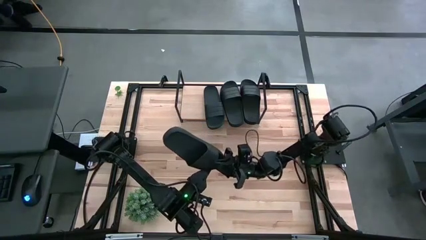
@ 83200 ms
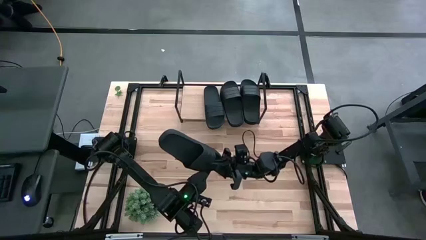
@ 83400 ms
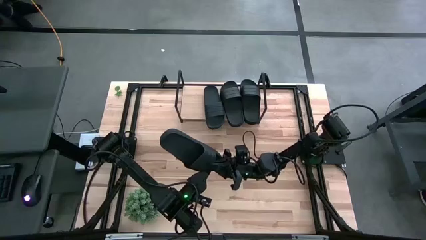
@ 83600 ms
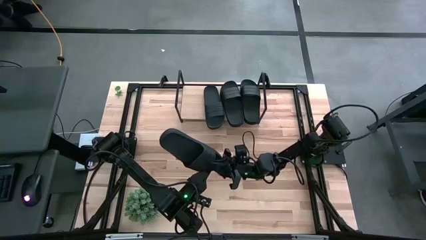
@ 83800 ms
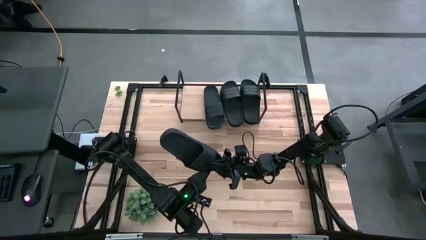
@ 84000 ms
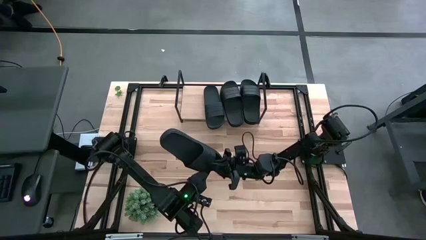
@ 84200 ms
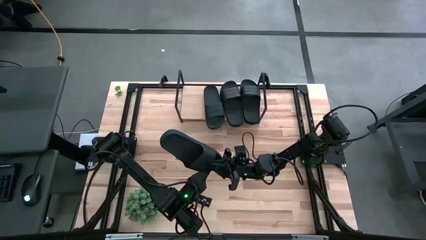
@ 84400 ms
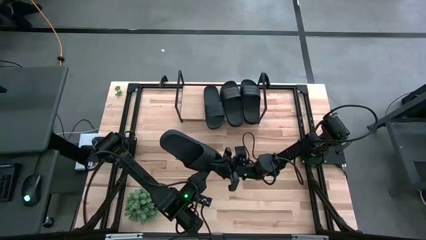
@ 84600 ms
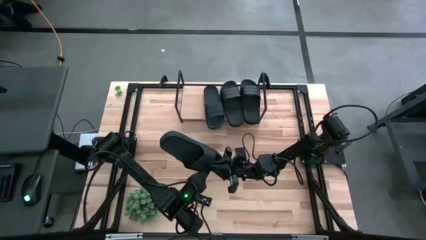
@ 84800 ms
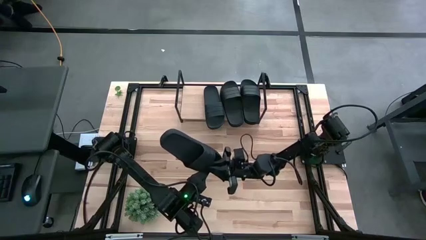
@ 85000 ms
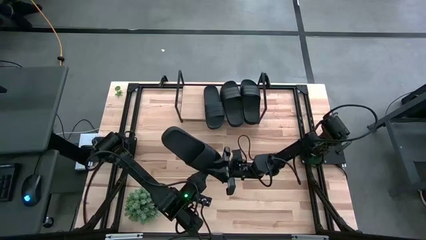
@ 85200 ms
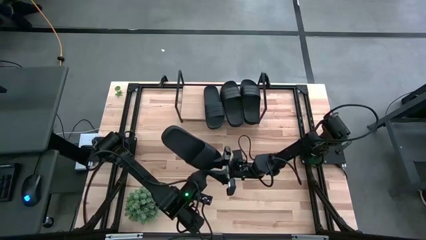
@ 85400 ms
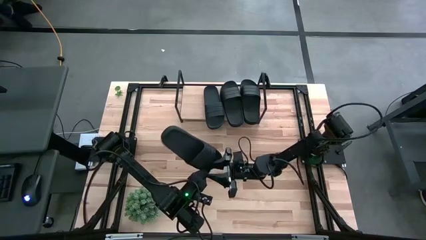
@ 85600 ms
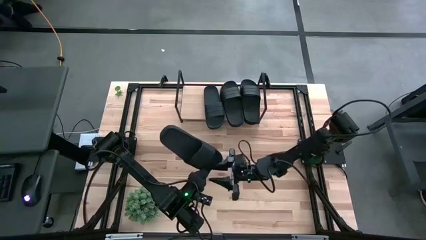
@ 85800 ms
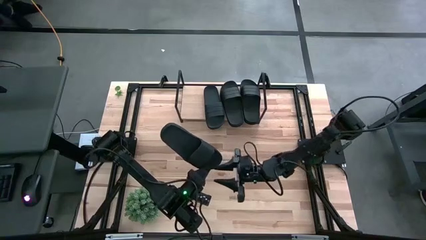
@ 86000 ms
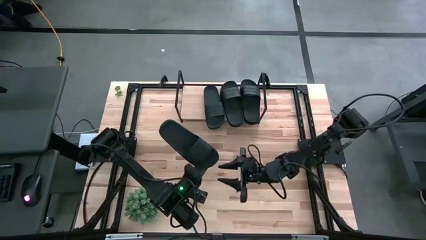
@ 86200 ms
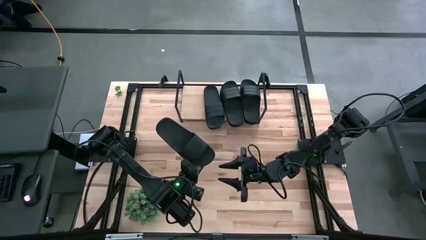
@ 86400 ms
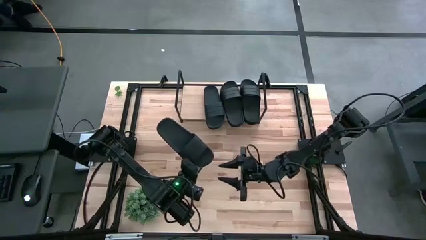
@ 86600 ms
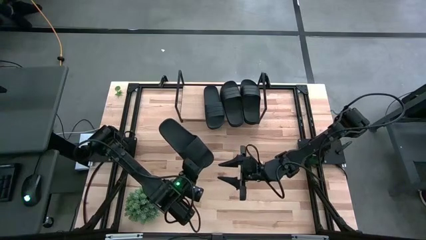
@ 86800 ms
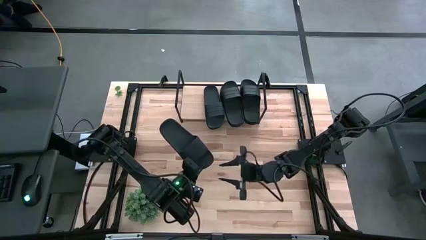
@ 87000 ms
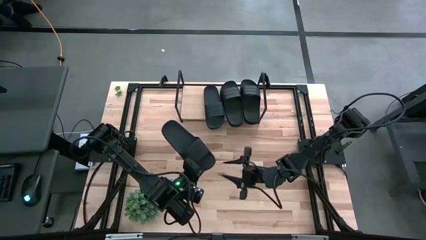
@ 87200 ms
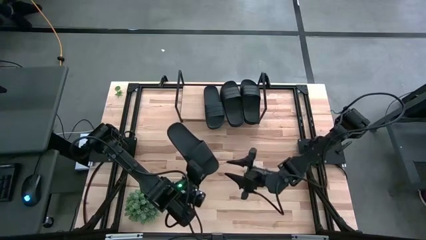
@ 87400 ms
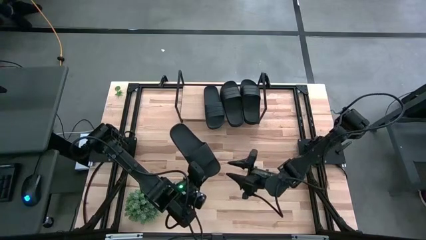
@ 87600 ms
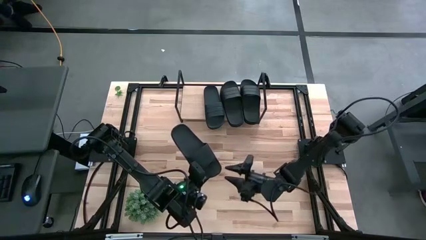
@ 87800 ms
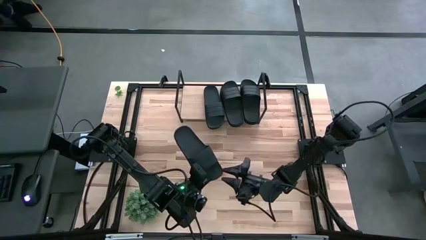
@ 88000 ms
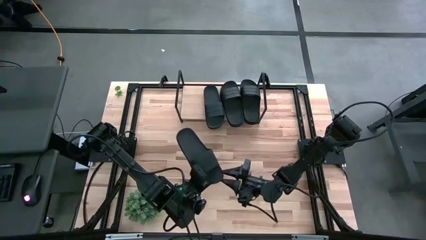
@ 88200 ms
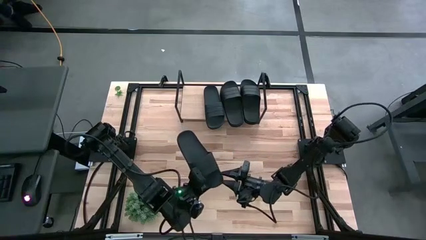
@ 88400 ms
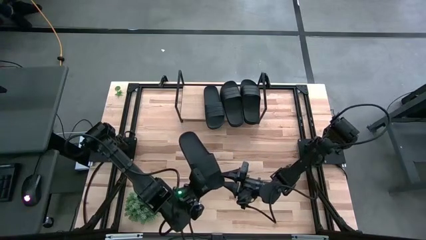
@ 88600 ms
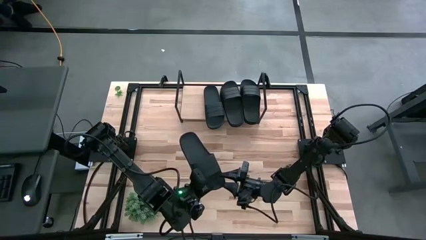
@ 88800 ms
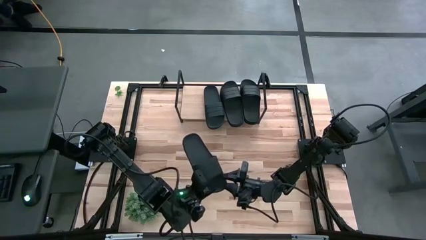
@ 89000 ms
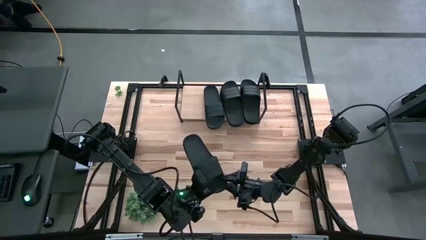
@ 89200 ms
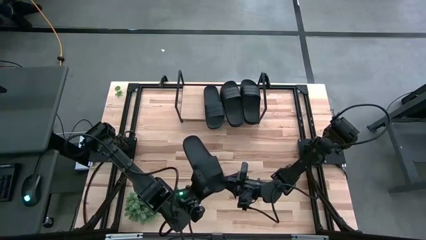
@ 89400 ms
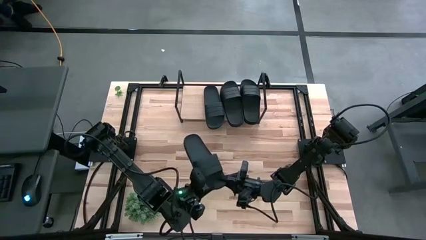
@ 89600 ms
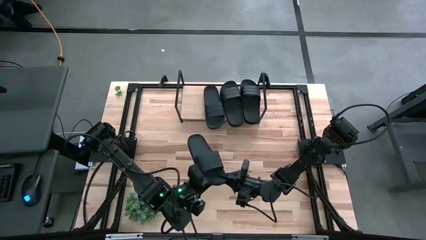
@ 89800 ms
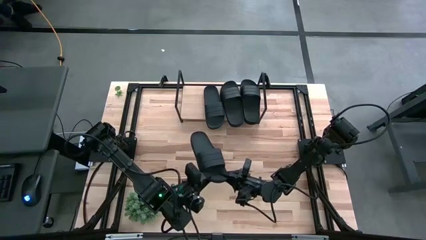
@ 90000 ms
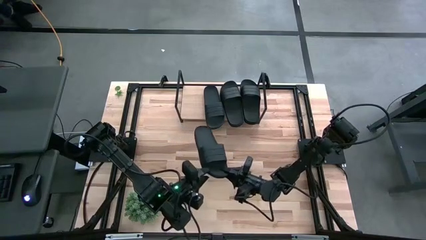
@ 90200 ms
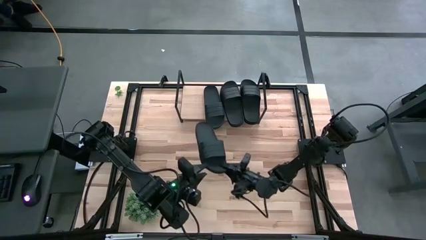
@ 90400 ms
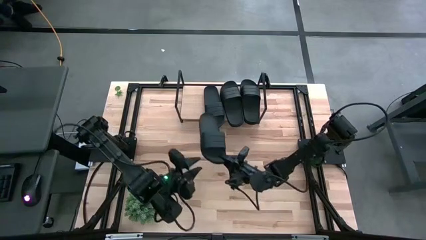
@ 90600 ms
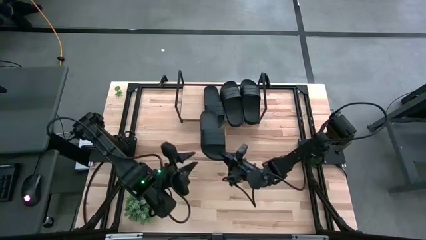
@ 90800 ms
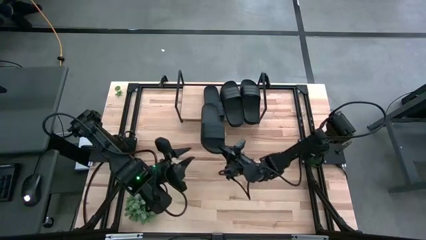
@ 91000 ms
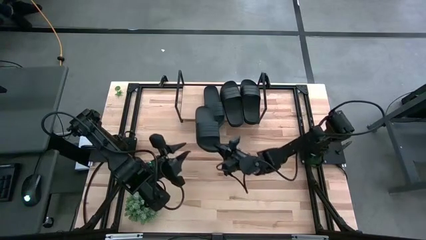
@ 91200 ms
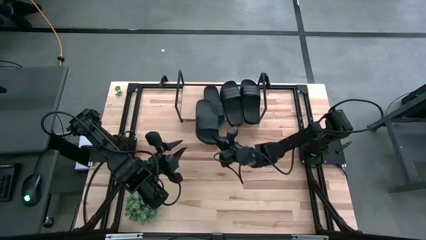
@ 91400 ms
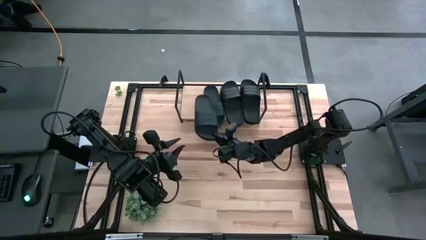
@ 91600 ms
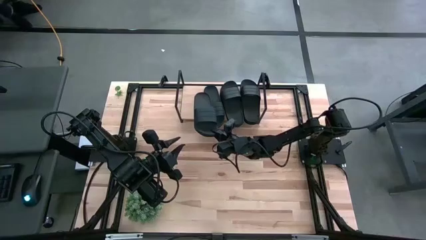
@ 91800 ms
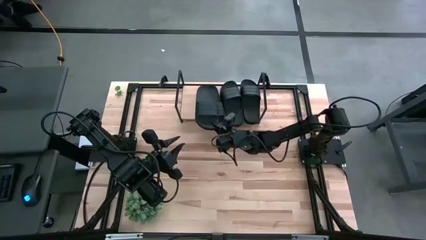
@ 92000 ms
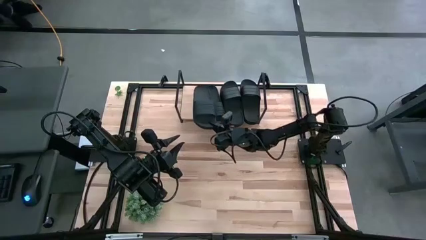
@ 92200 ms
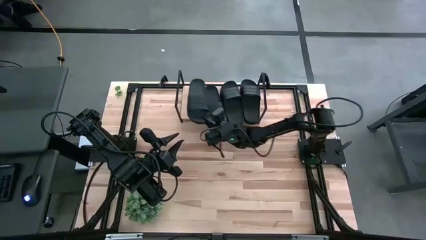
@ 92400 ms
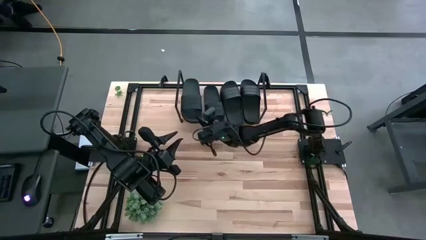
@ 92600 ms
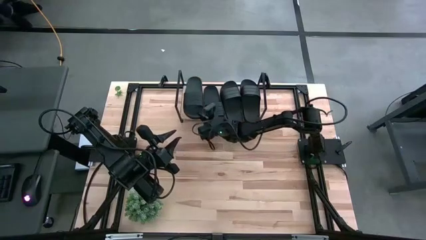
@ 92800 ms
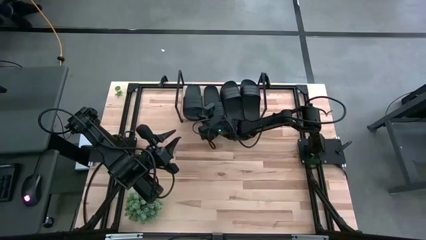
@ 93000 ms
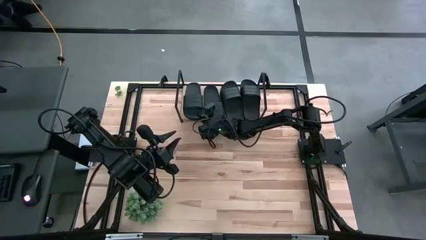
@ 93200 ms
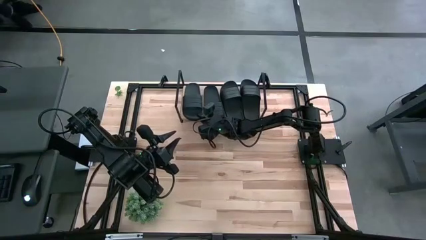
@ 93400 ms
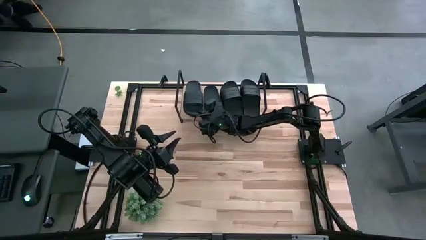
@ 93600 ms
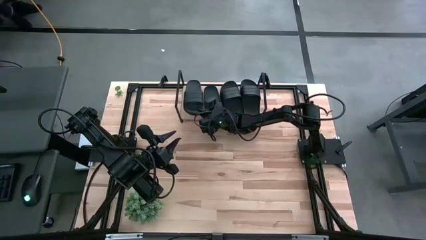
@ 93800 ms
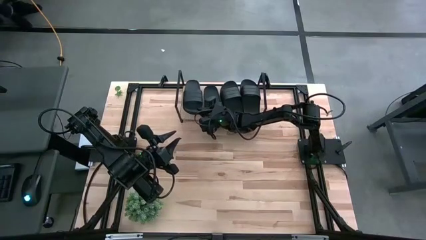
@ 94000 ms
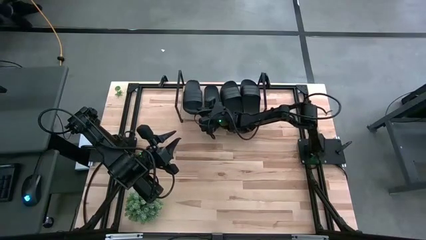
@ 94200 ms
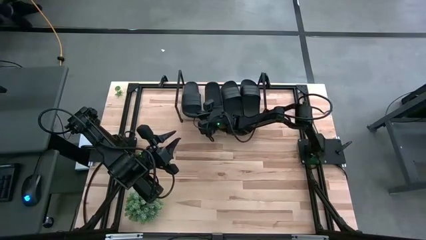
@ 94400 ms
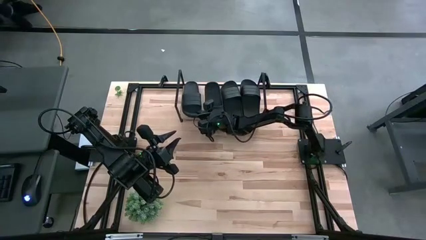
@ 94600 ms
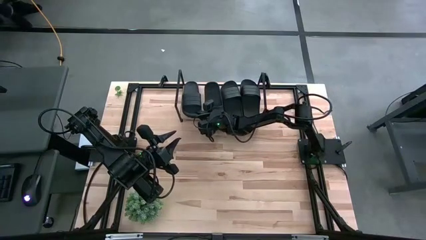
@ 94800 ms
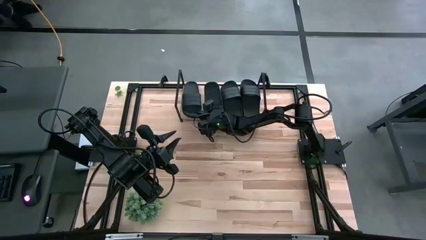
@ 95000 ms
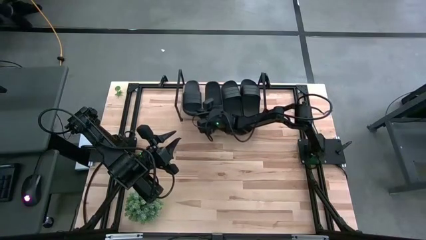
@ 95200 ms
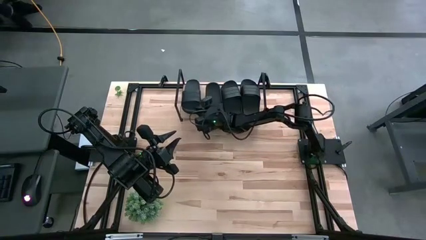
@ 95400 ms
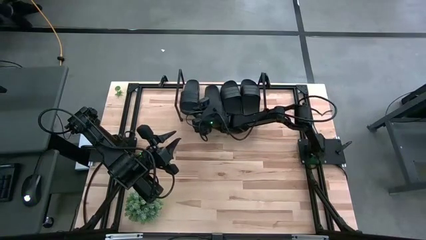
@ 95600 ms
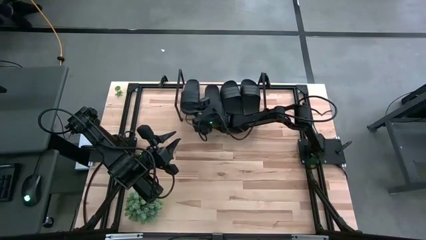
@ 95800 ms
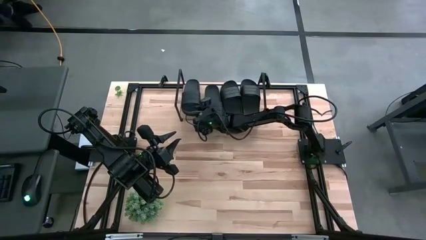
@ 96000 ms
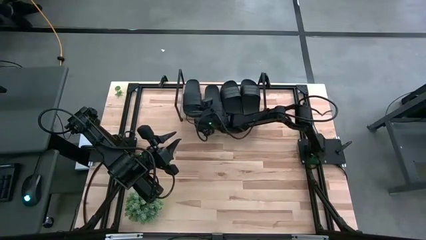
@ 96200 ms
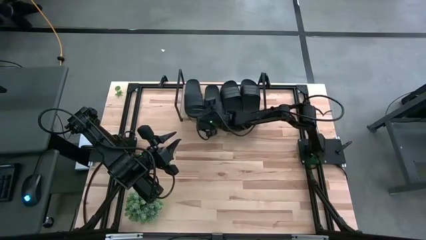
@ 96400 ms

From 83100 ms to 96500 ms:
Task: Pick and place slides into the shelf
Put the black slipper on the shelf

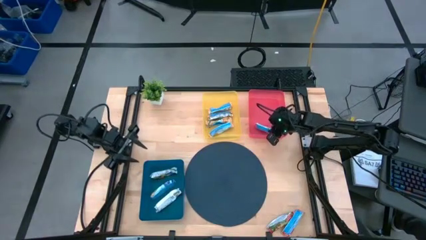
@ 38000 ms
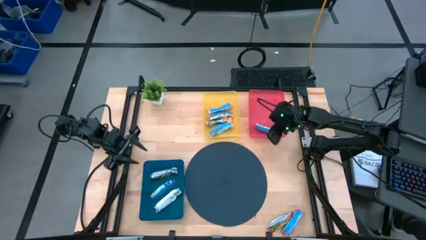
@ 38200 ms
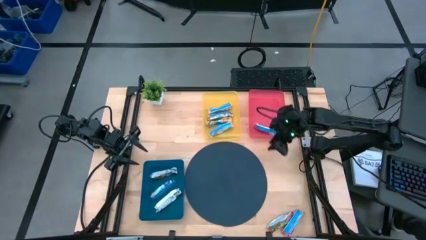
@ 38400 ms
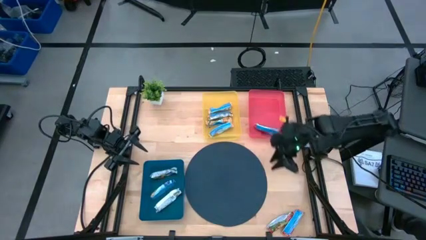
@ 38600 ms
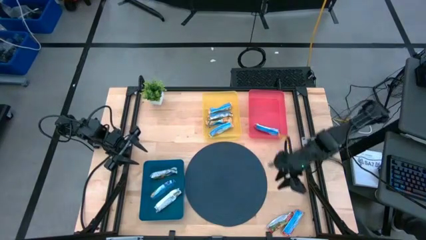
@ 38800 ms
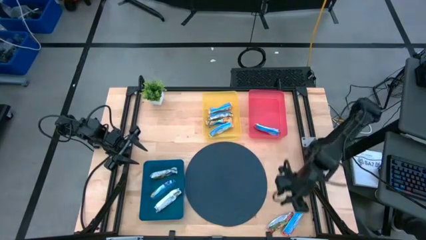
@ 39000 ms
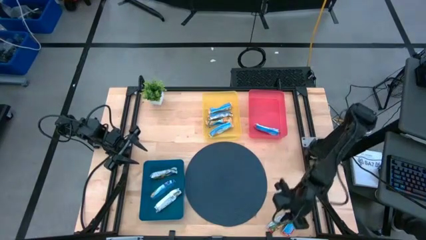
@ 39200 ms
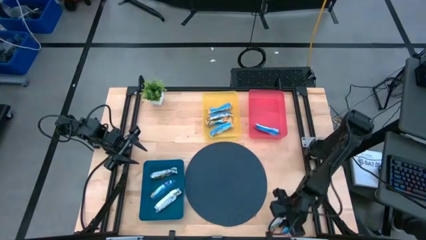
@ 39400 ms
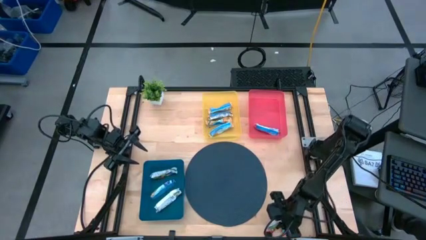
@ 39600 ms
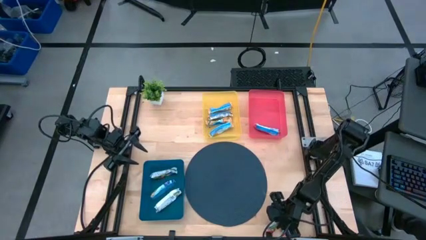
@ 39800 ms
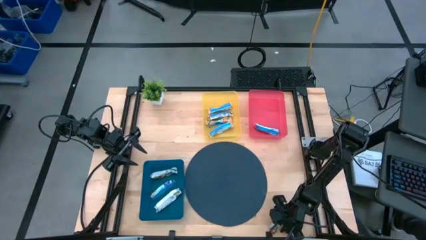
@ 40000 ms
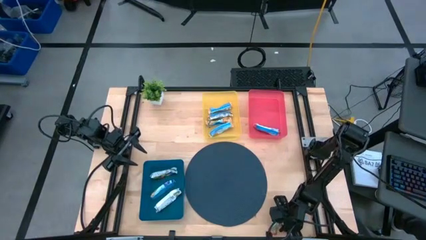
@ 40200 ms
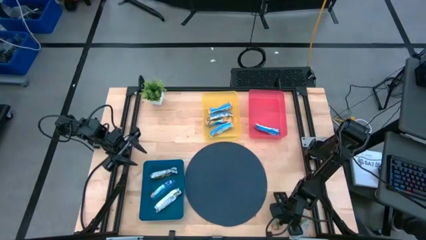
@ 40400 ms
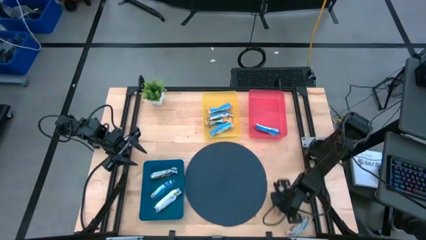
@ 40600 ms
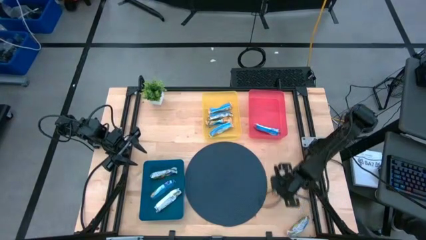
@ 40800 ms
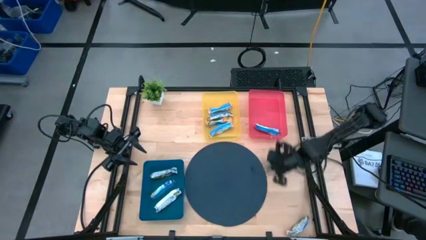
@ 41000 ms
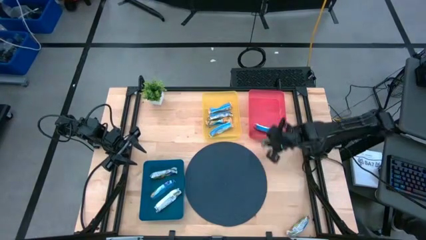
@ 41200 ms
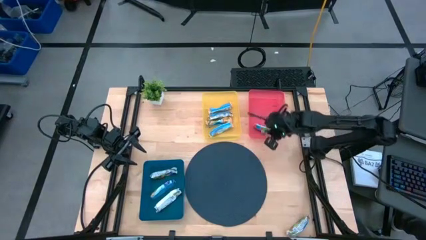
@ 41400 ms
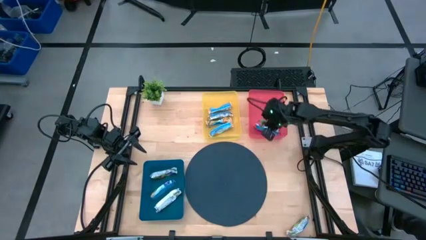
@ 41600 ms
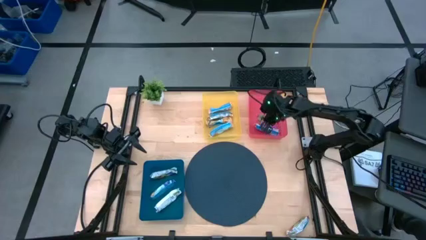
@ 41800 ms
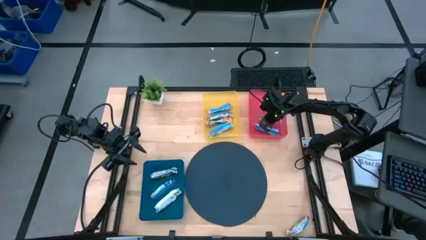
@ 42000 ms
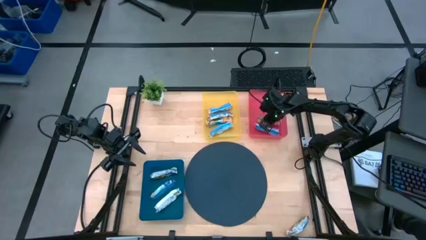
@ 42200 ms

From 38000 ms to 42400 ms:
Task: Pick and place Granola Bars by type
Put the red granola bar into the red bin
